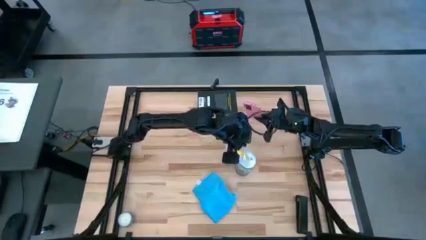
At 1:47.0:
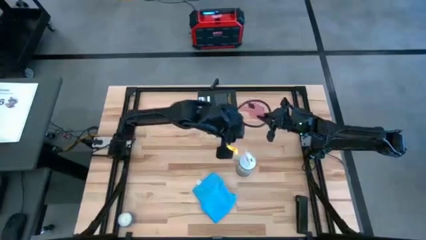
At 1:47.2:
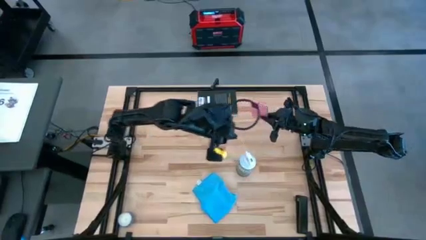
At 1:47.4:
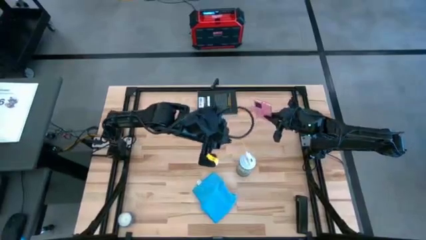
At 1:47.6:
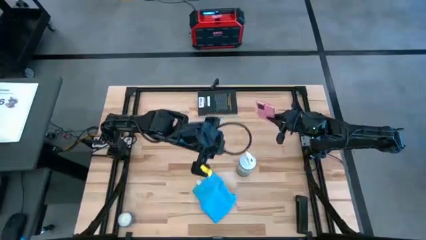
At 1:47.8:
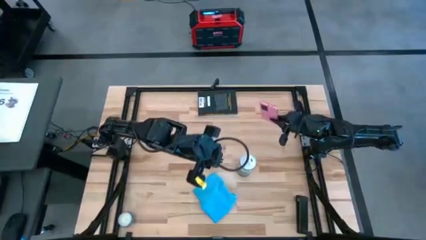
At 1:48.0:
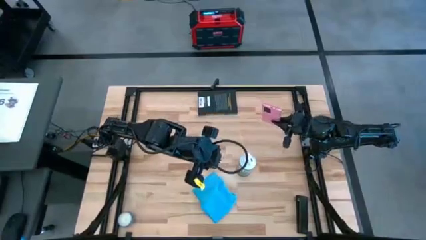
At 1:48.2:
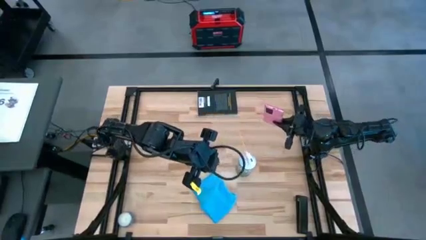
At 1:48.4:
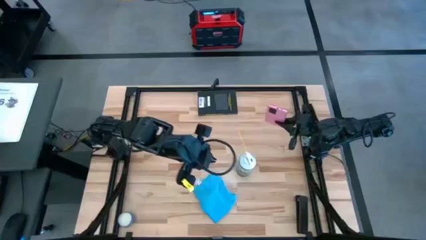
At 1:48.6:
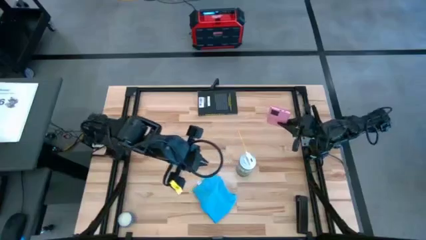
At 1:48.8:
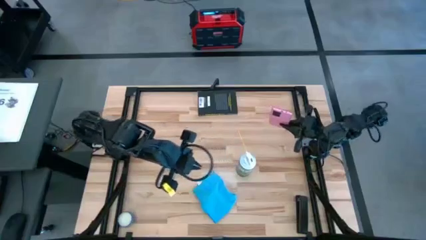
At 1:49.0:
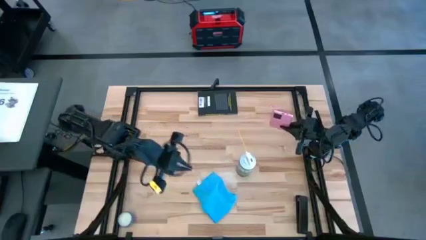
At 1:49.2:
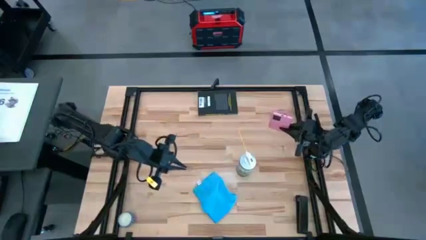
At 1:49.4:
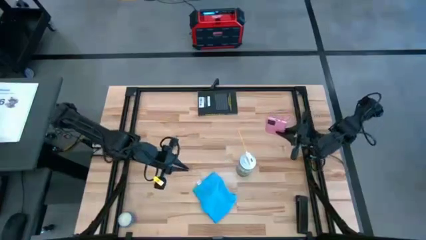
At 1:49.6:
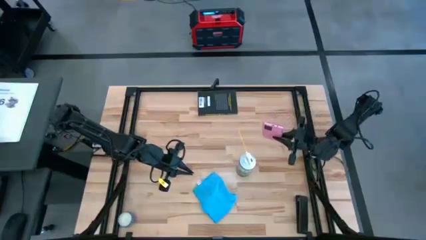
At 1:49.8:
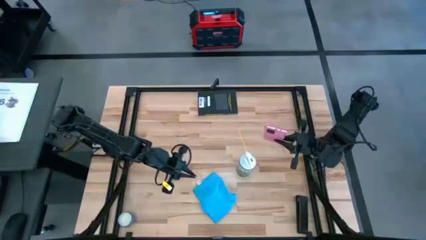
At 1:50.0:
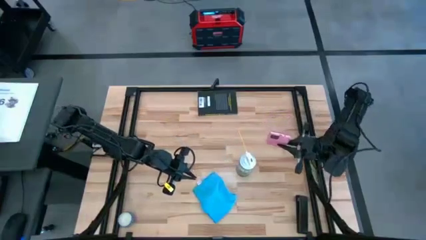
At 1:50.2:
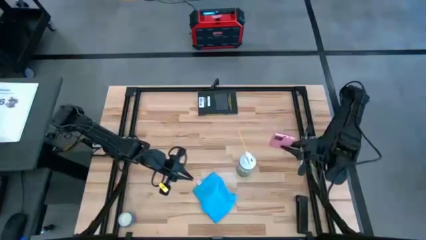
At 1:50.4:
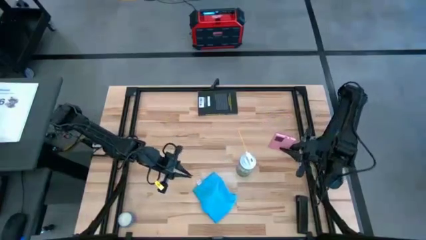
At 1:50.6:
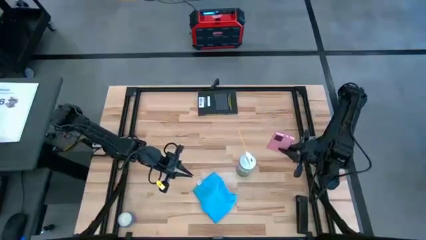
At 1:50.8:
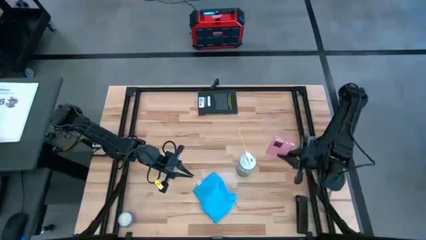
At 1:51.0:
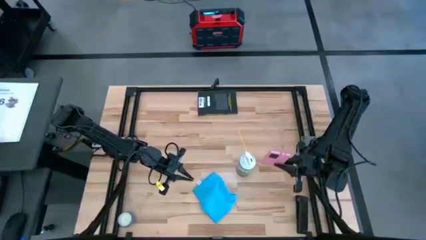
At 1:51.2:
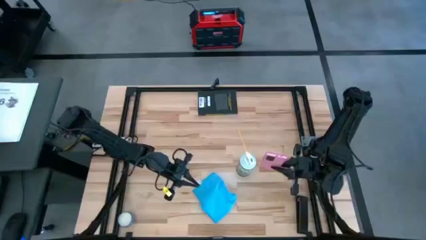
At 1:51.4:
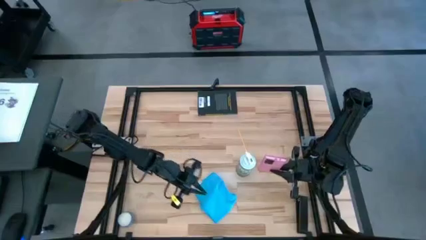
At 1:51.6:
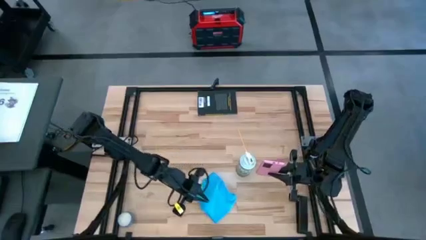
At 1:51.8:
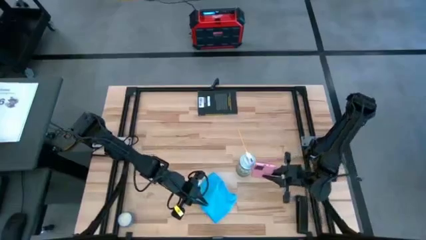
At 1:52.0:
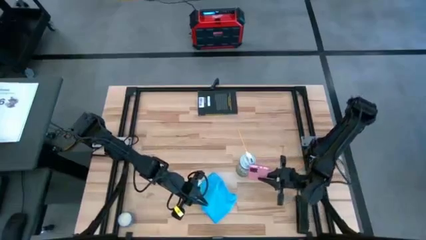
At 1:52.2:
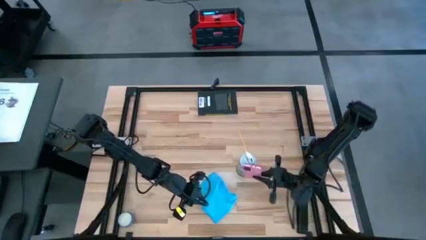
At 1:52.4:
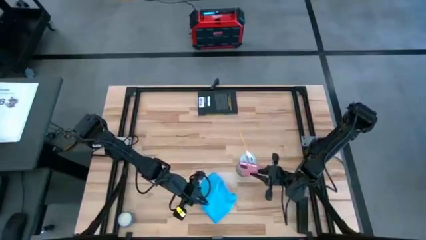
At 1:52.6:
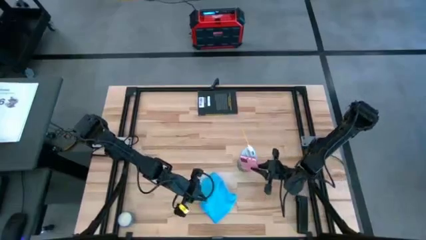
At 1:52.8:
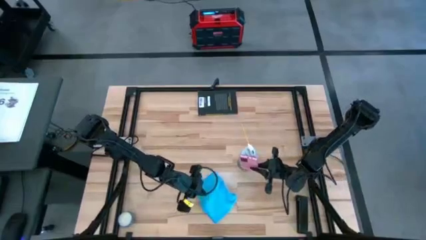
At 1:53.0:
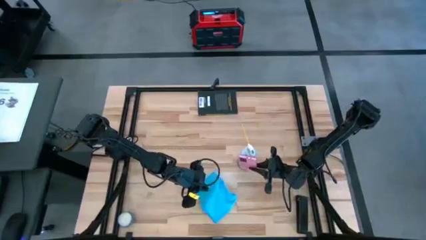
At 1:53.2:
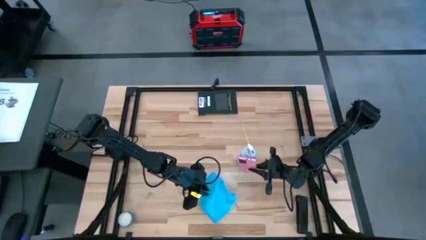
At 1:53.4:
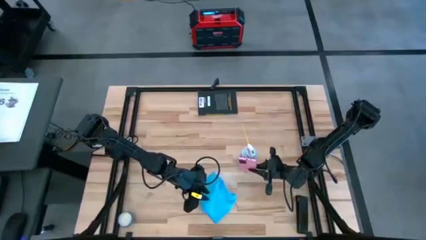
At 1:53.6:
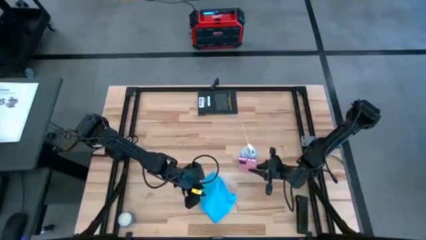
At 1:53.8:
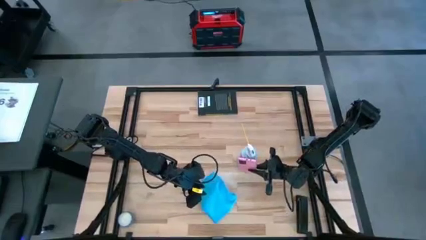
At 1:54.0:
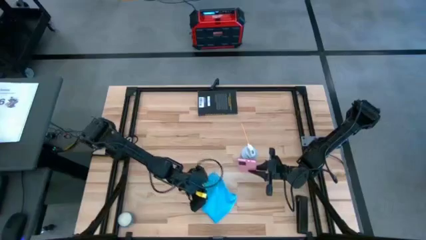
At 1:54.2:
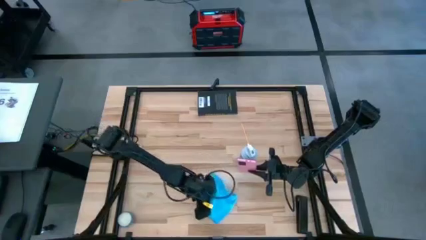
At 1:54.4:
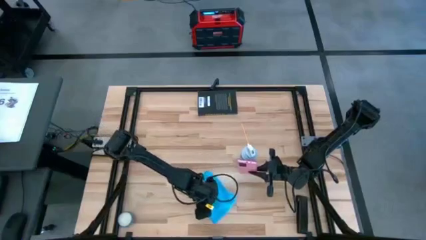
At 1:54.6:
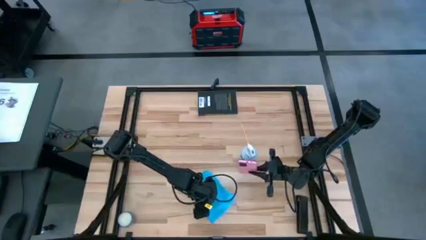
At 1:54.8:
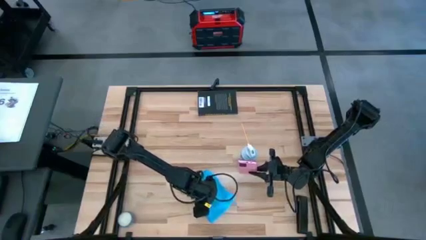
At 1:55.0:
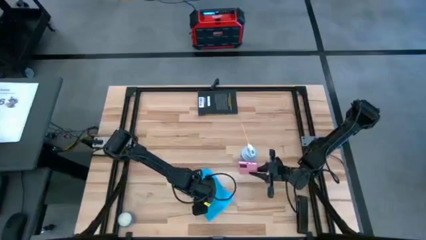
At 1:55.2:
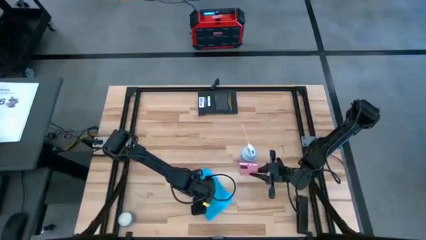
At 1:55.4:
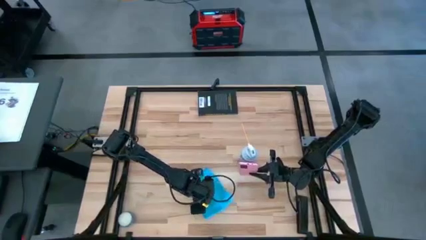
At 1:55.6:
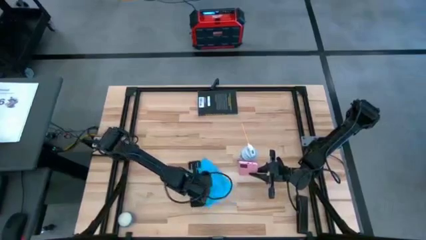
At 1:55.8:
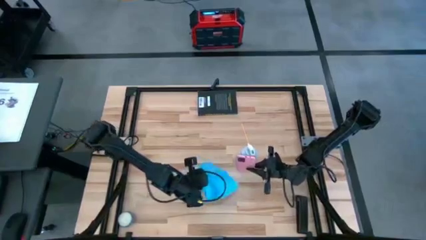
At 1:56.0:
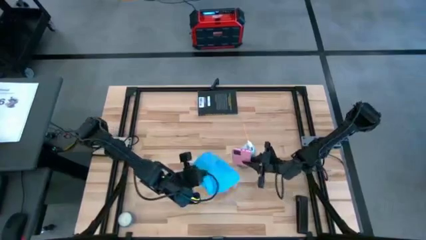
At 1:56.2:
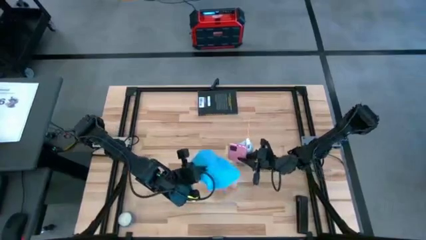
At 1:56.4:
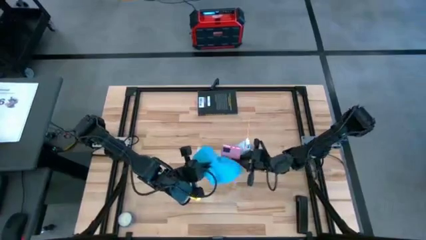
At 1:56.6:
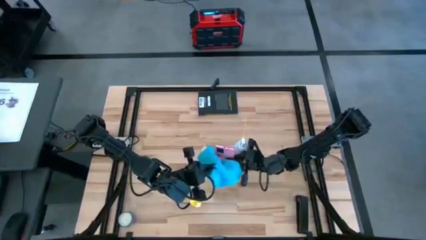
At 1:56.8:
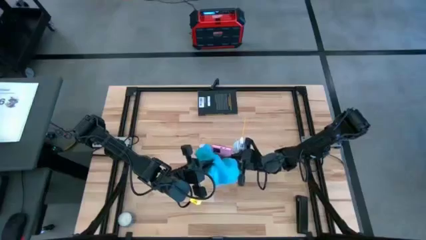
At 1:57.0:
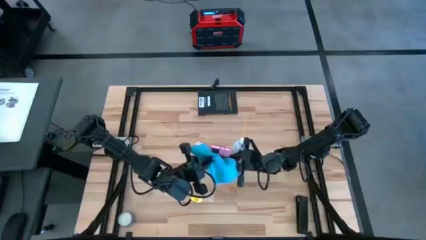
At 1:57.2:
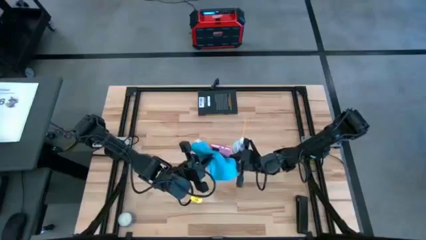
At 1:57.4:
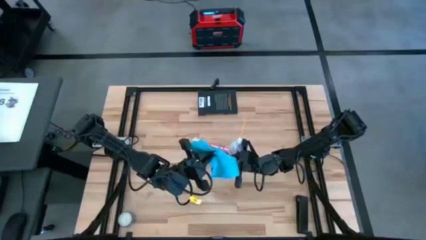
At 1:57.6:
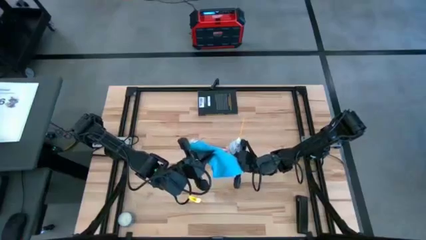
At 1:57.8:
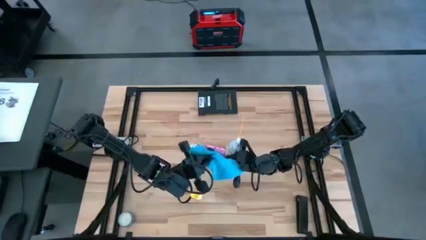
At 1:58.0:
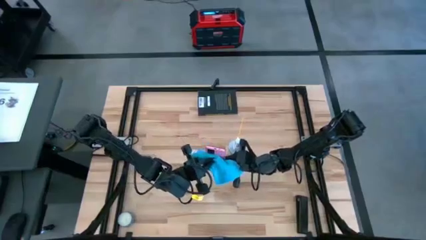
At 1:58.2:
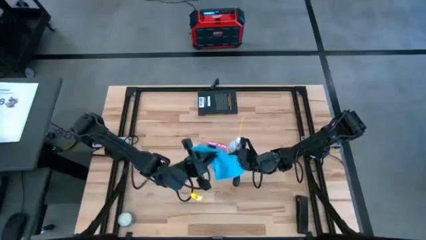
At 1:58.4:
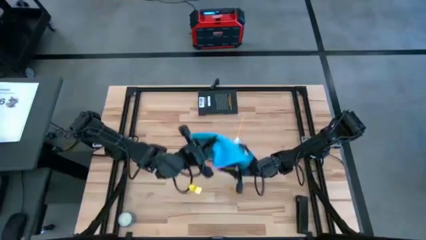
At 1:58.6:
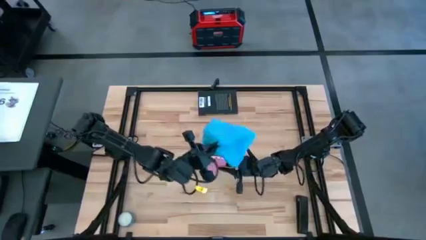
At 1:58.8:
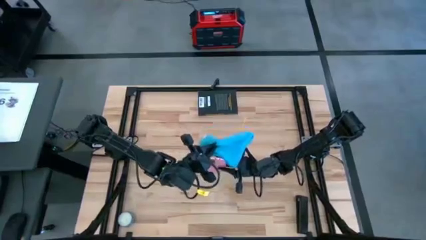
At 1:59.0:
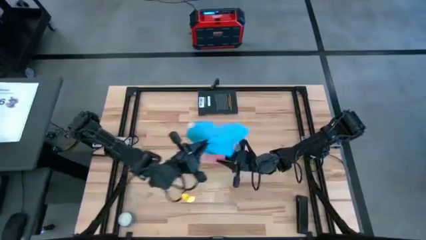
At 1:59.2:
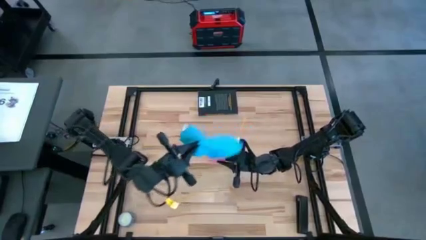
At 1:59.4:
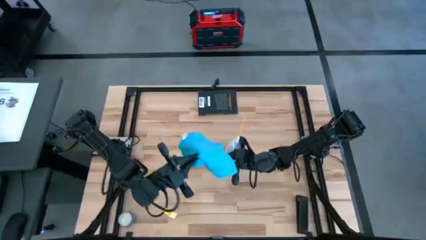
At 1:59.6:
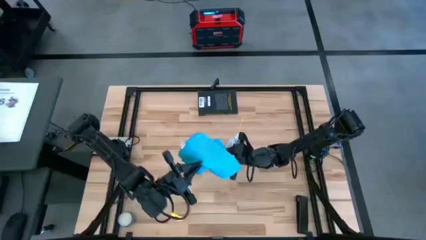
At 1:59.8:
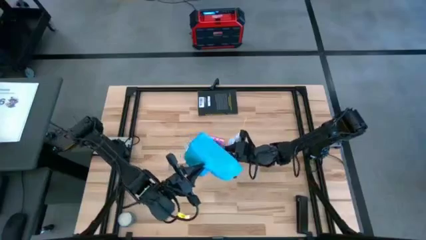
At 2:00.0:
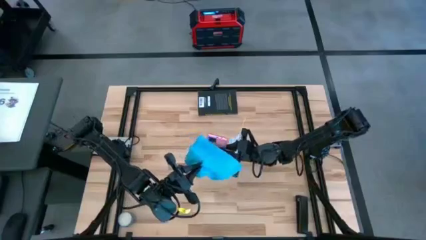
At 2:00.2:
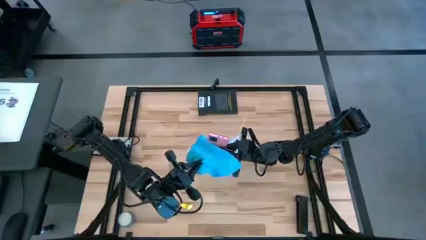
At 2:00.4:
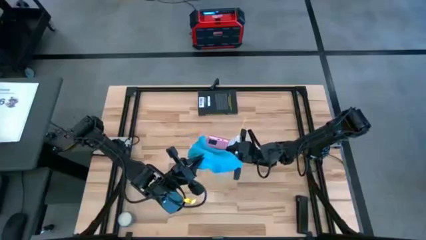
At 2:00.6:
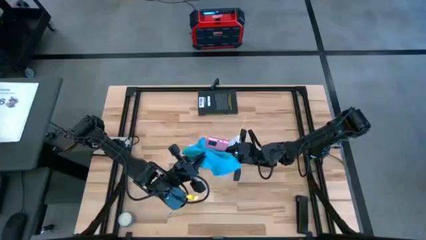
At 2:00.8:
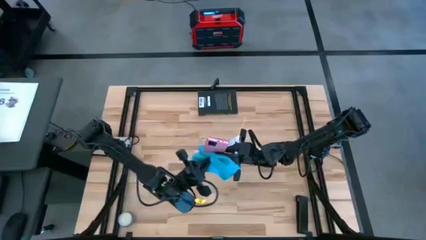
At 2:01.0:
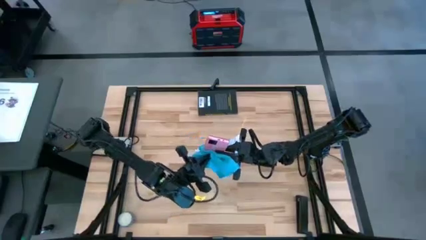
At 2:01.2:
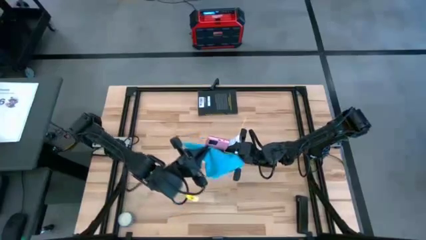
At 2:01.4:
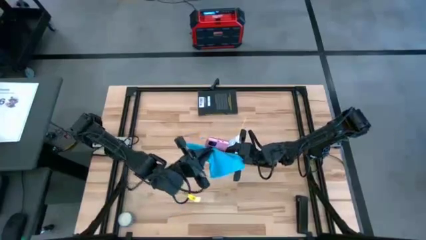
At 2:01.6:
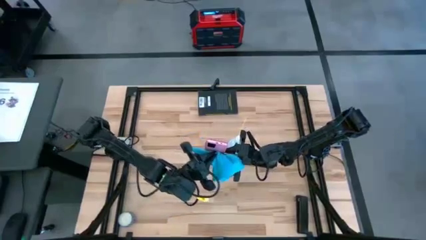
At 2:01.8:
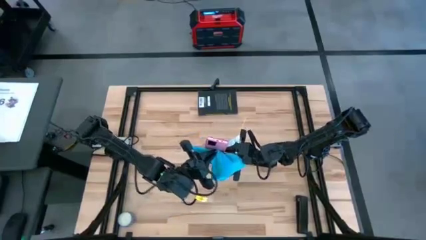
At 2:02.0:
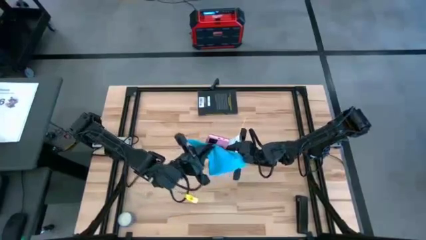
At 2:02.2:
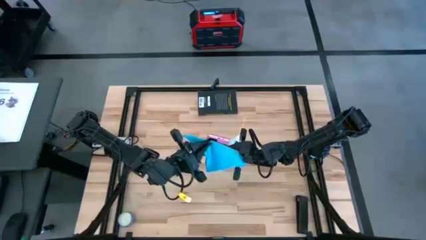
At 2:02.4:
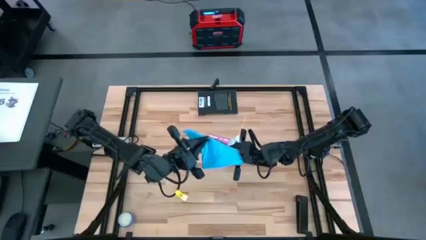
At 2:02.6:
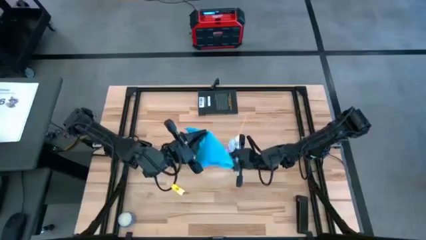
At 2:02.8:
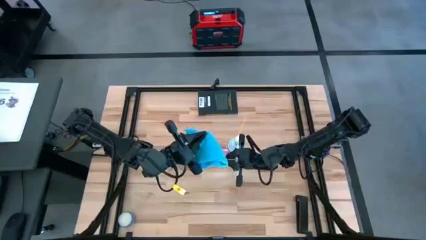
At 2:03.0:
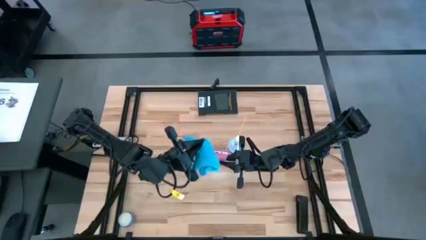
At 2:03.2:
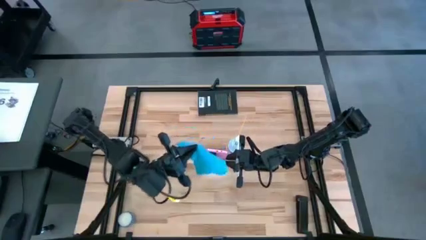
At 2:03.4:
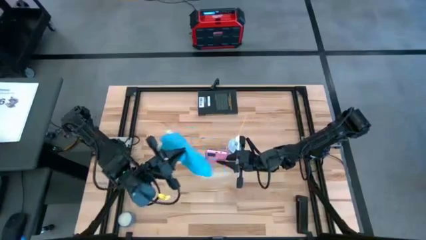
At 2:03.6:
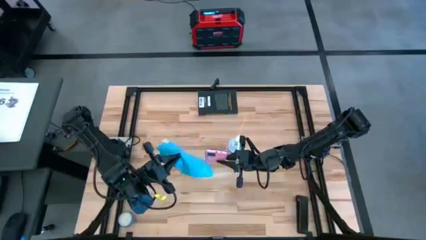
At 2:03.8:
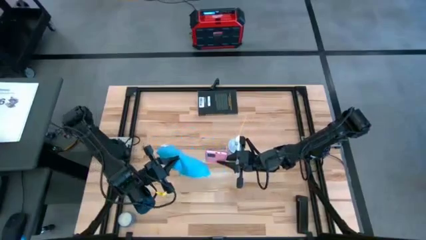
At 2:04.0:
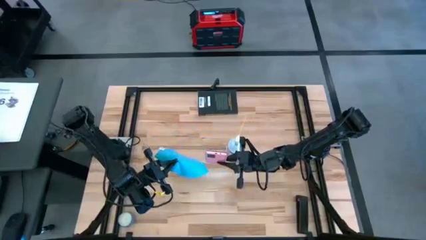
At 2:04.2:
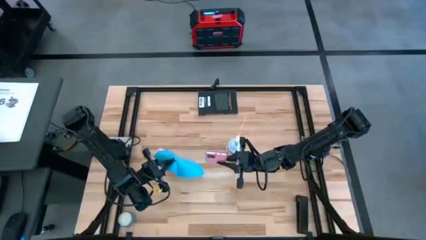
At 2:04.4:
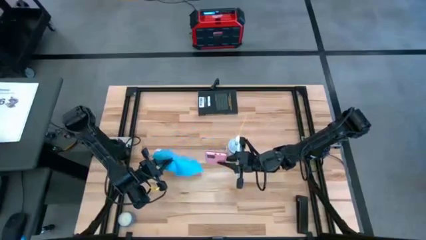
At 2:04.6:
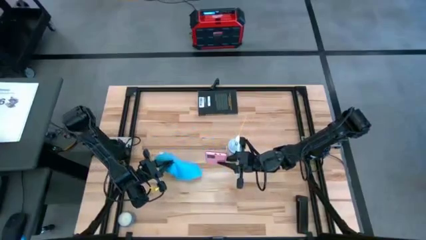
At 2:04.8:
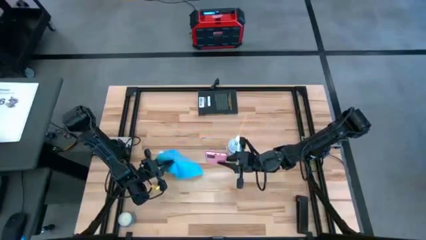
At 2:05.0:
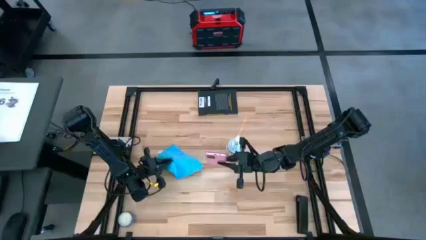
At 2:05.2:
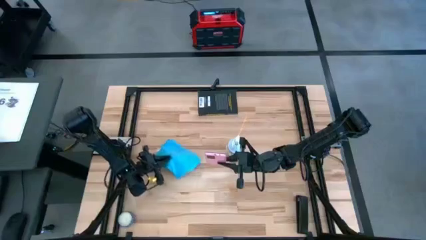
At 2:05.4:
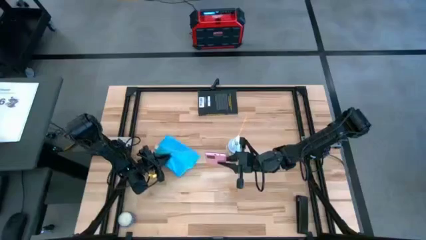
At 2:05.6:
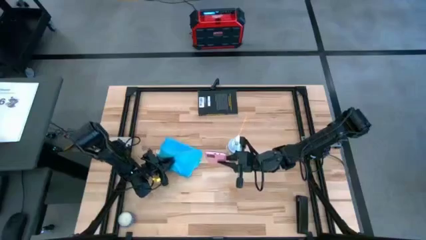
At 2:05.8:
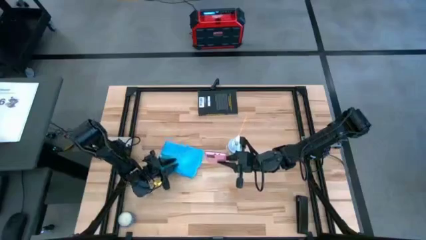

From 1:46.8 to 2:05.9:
Task: Apply microfiber cloth
Wipe the back of the cellphone with the microfiber cloth
